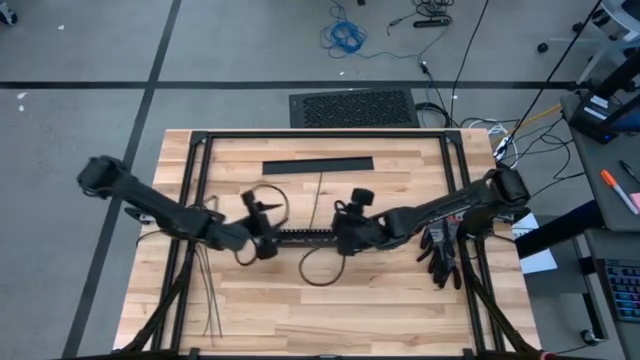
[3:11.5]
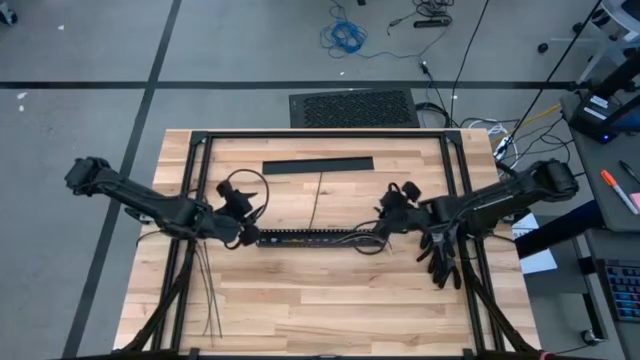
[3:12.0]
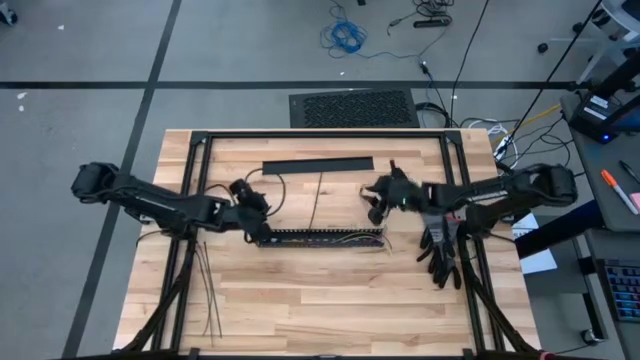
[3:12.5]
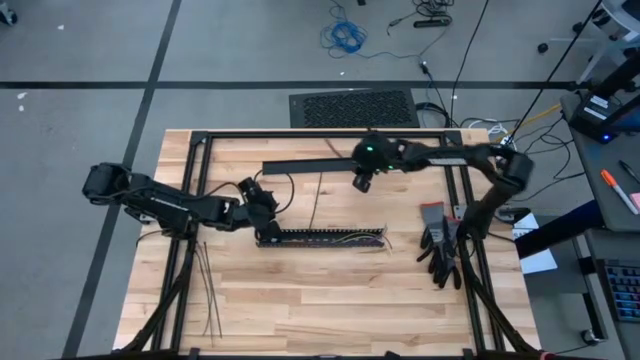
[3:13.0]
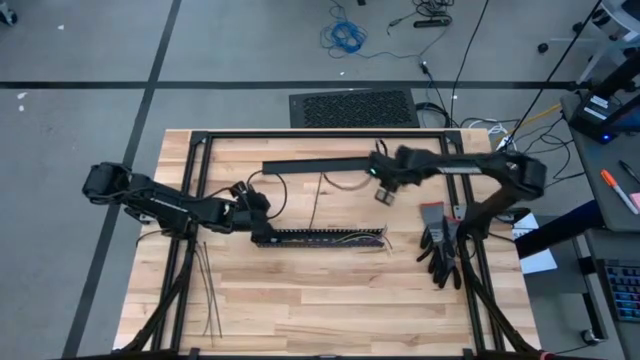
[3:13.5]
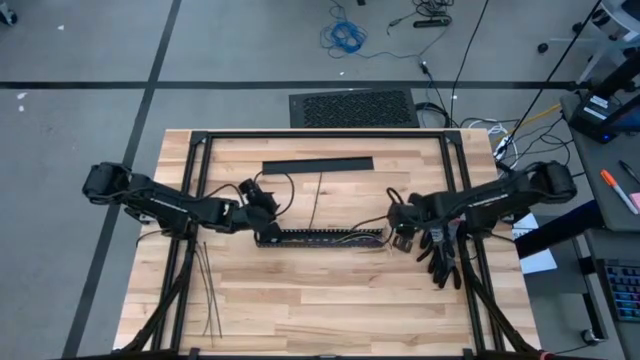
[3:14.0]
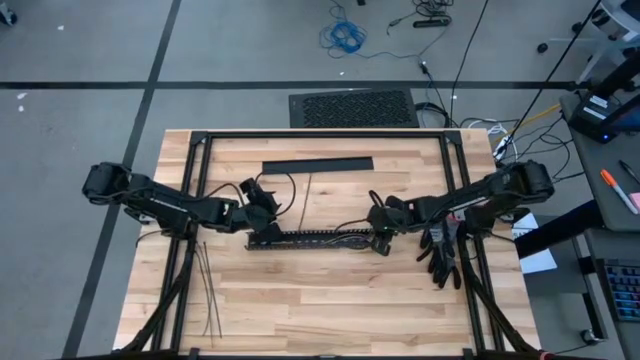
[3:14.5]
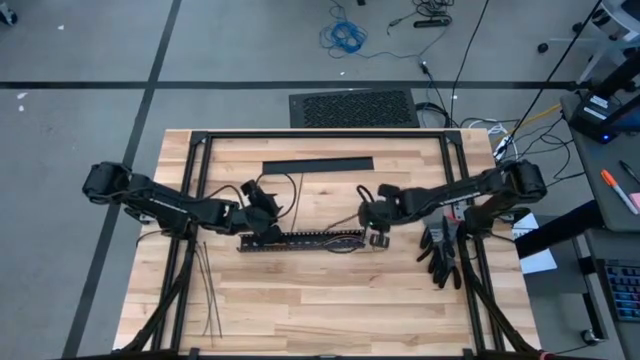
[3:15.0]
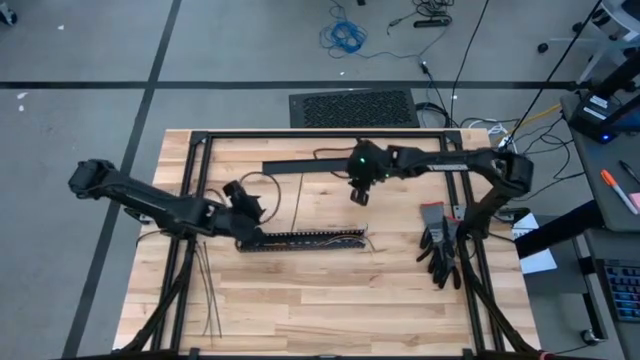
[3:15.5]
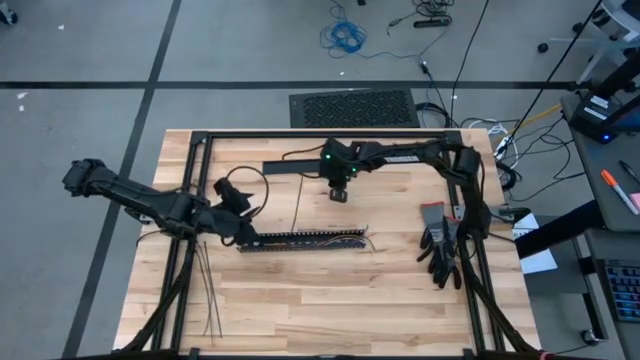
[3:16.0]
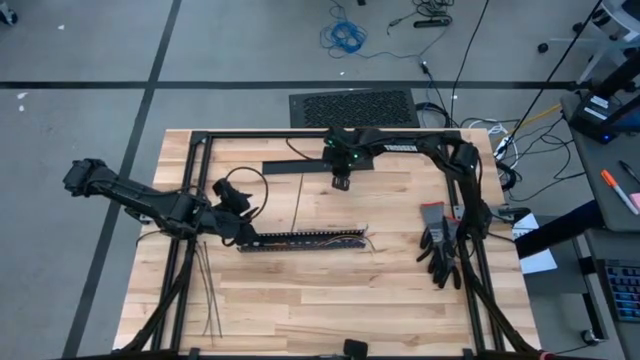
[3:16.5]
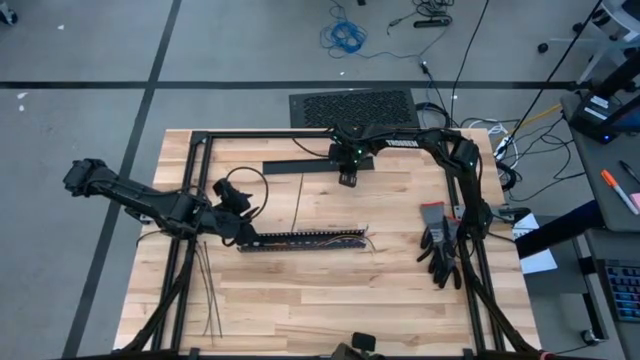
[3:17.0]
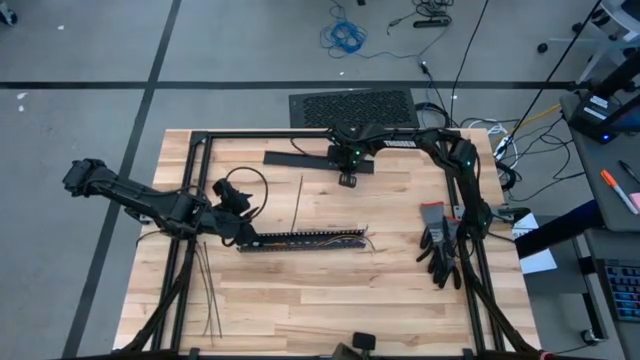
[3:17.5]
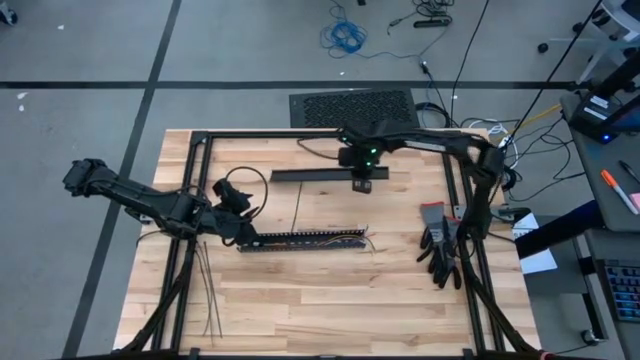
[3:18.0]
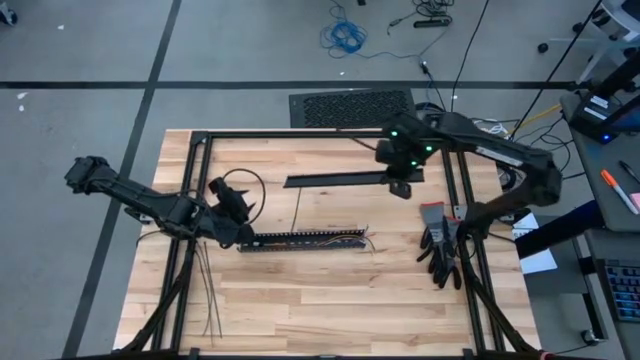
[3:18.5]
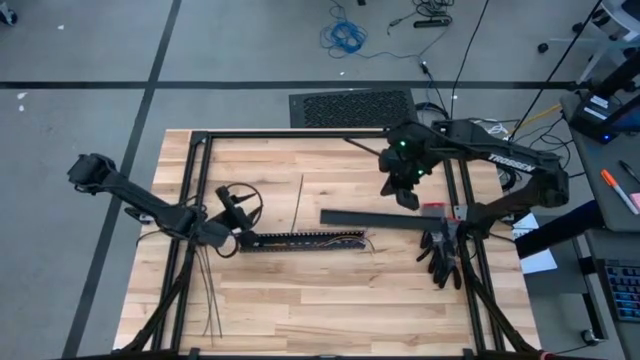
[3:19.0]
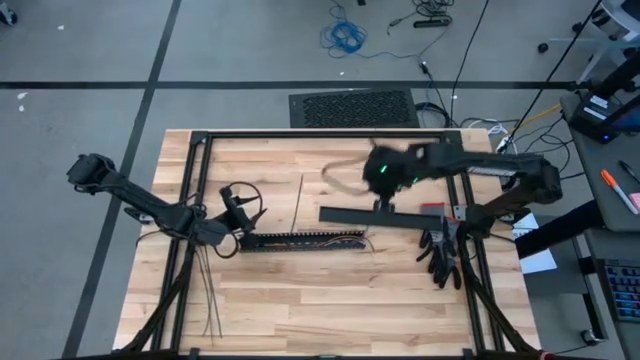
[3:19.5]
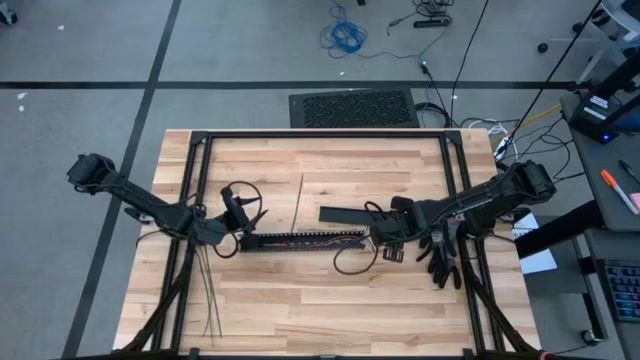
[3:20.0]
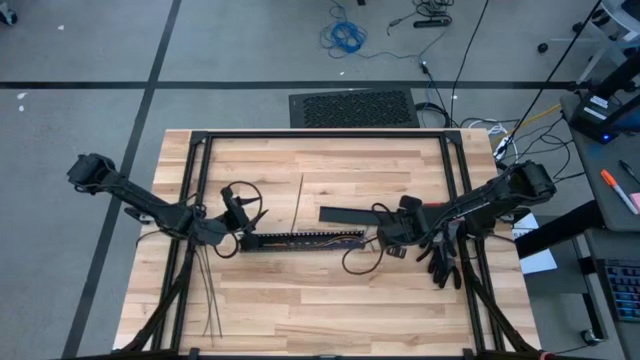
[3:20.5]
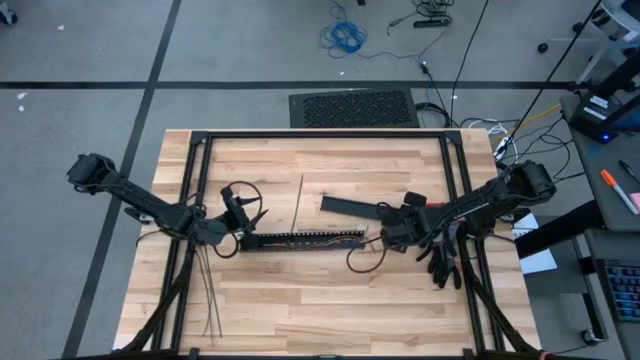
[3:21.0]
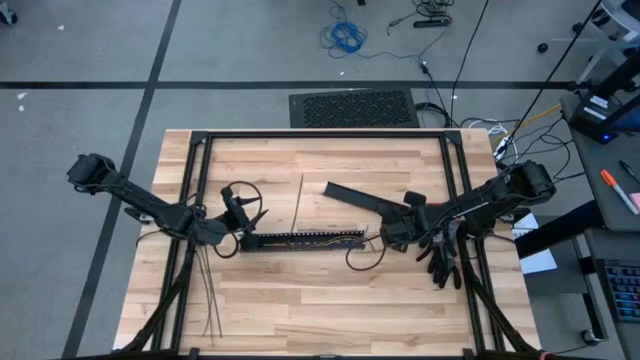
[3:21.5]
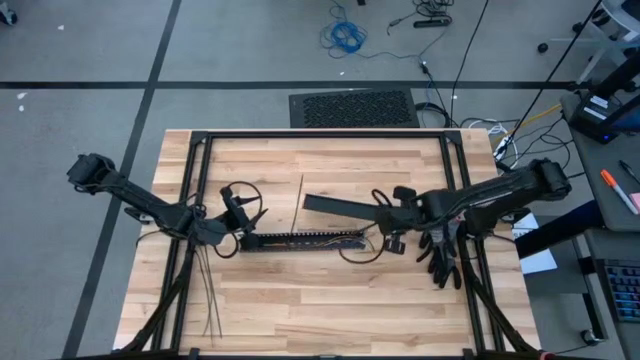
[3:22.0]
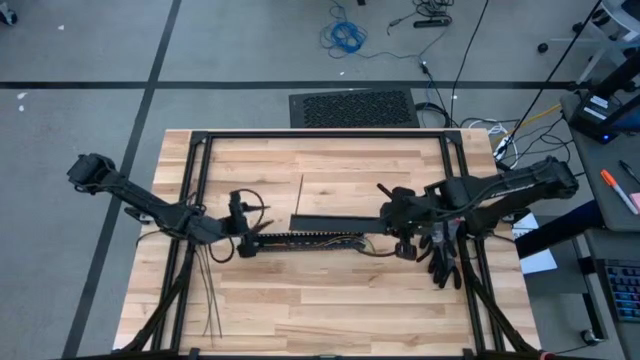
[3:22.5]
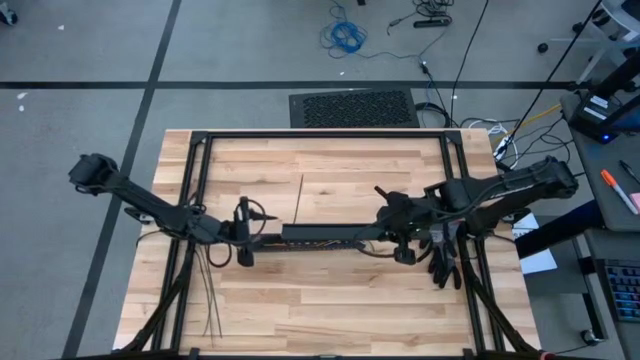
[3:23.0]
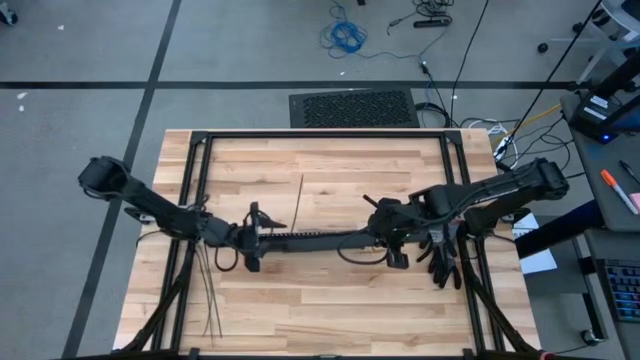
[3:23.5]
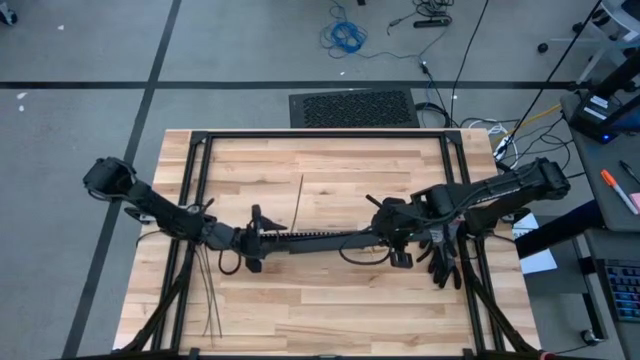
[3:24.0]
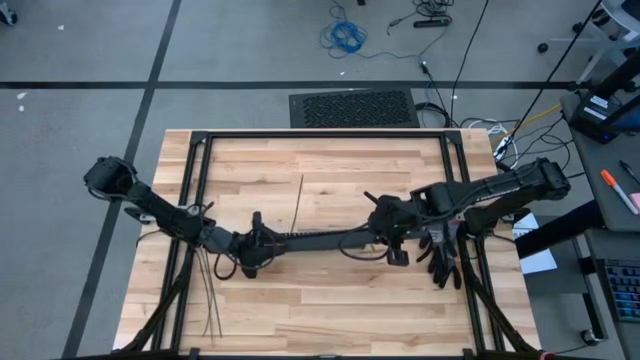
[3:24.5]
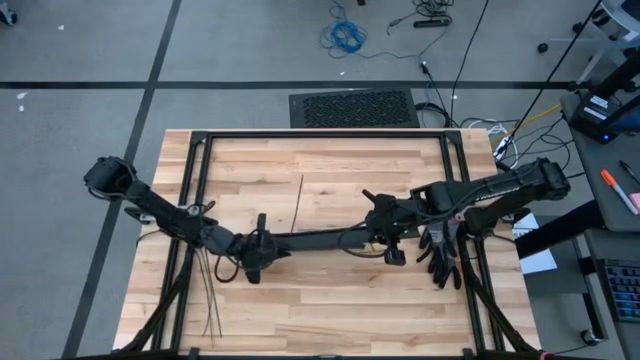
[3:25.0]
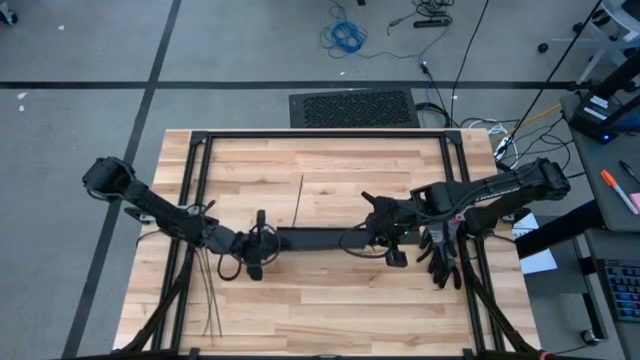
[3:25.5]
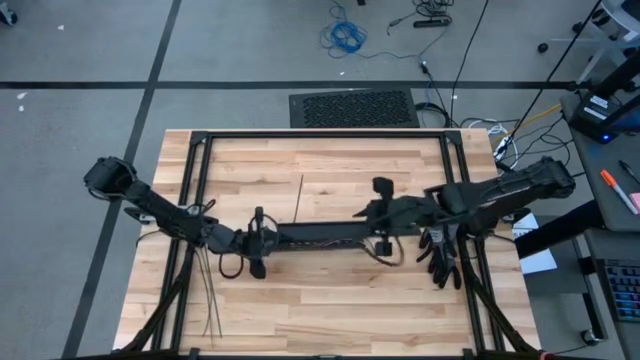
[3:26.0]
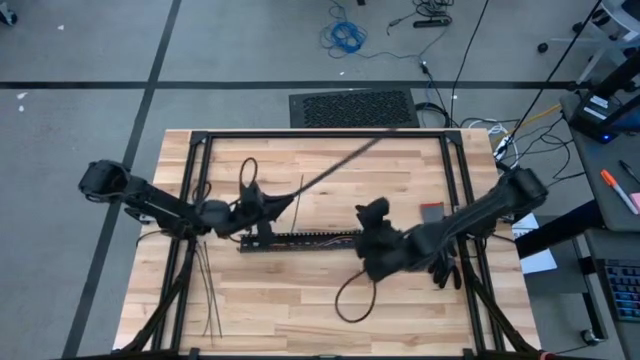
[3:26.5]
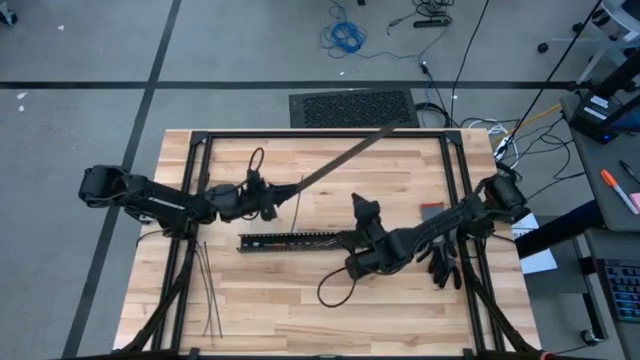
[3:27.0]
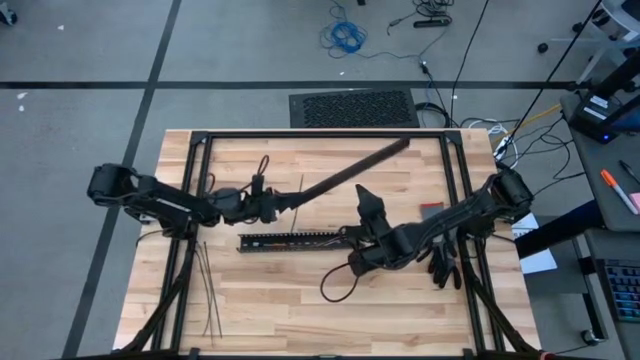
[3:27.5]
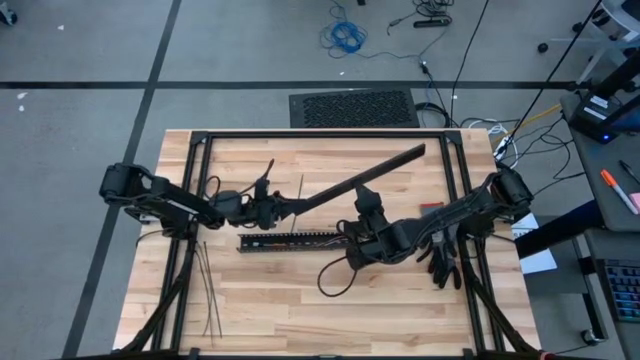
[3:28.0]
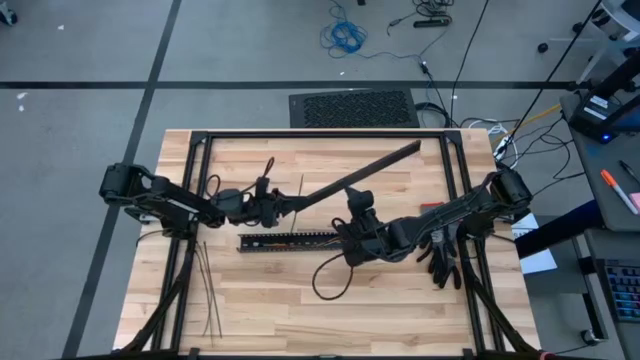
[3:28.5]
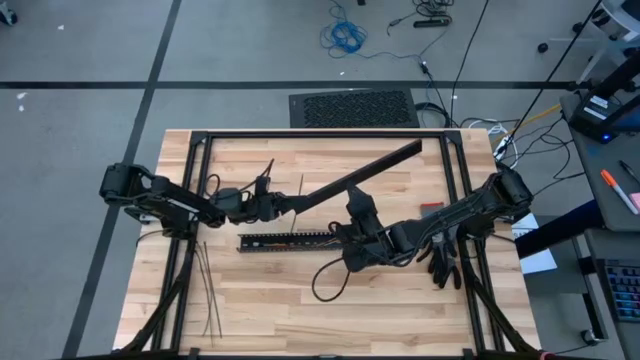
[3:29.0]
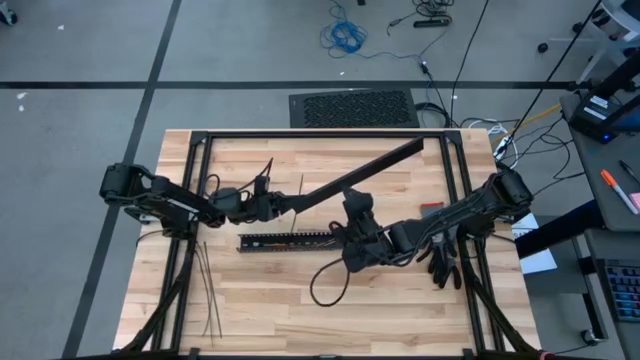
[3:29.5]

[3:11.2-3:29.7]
Task: Ziptie cables
Close the black cable duct

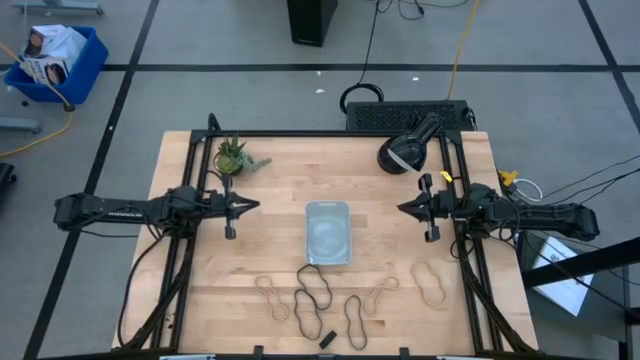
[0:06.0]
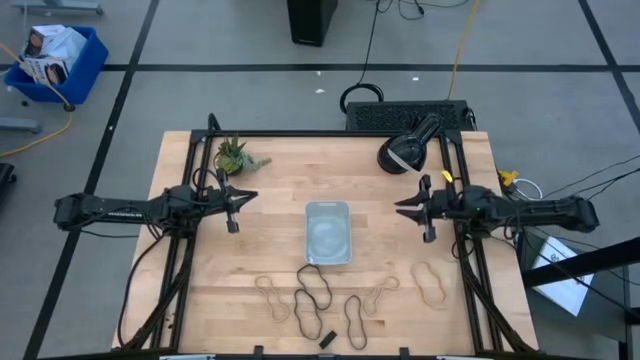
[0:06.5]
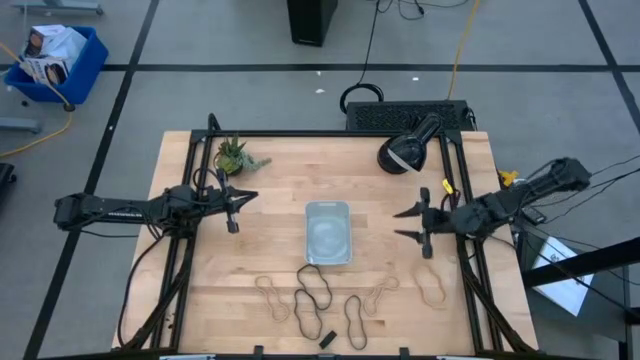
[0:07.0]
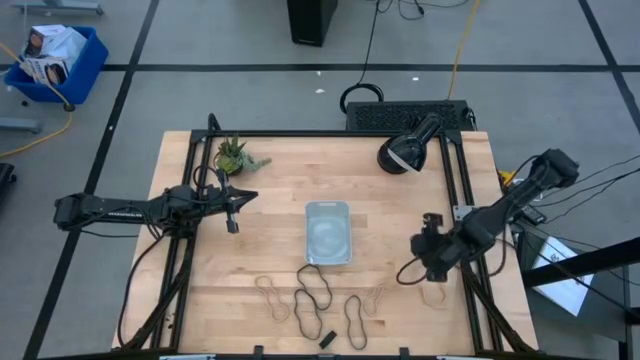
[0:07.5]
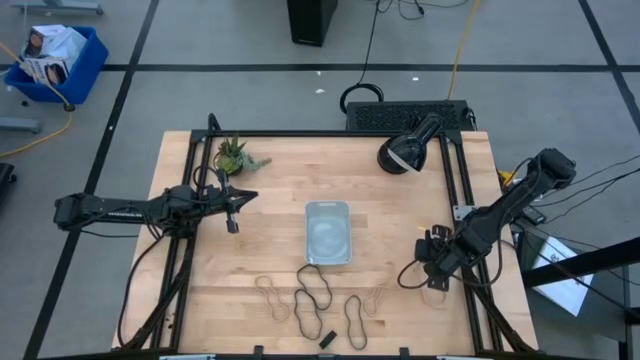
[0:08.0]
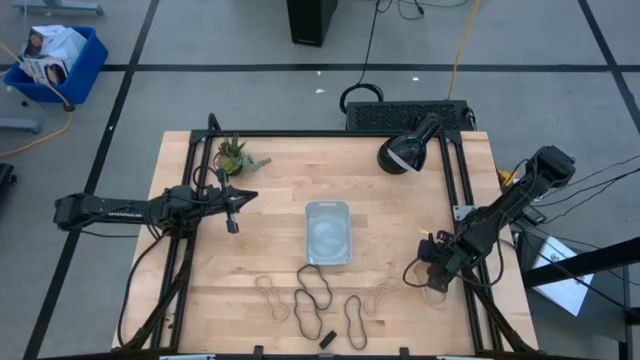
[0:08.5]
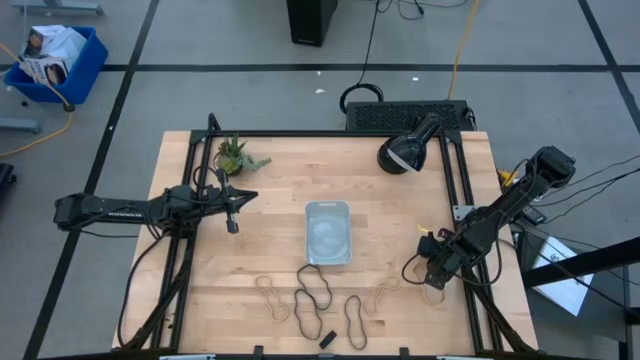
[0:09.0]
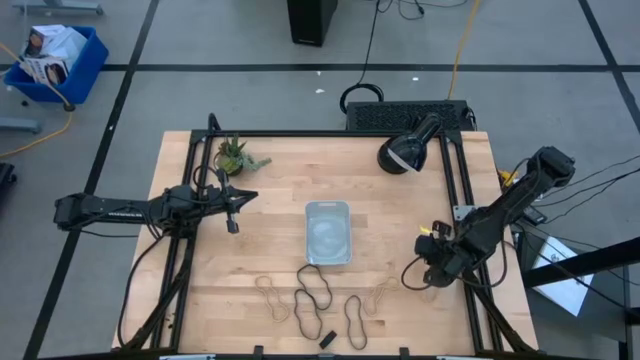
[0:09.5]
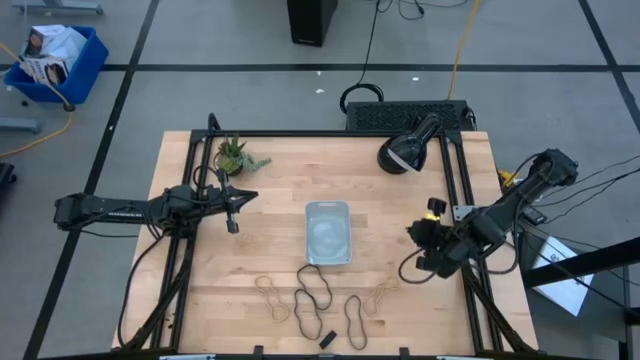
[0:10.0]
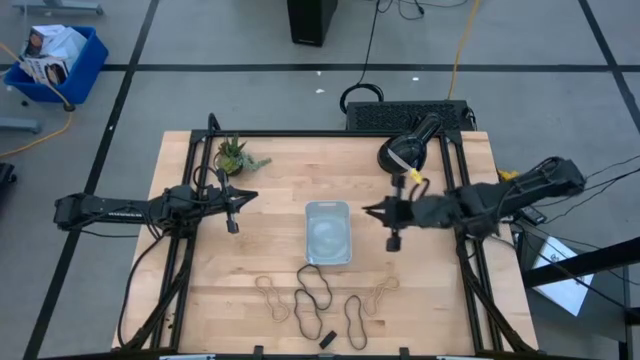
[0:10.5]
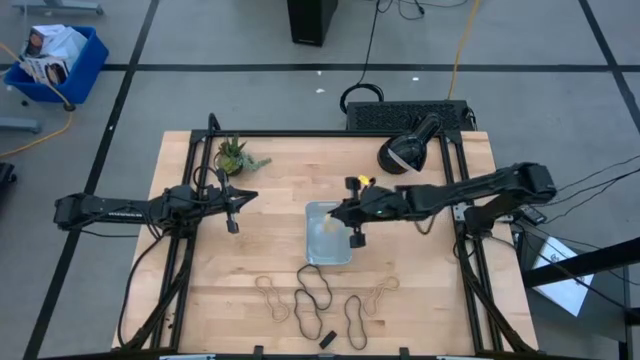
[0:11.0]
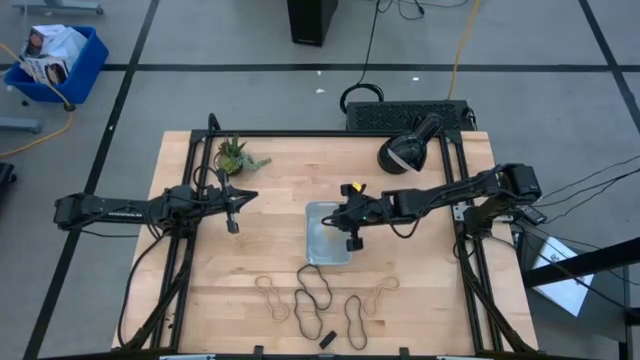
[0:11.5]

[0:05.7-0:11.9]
Task: Pick and place rubber bands into bin
Put the right light brown rubber band into the bin
